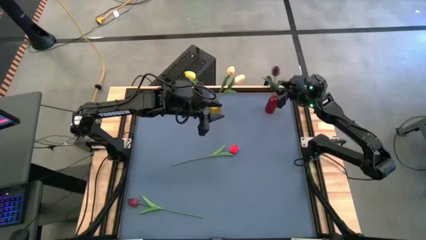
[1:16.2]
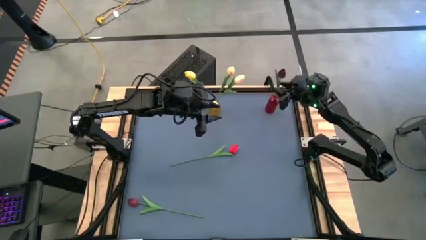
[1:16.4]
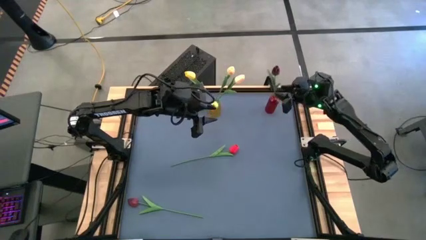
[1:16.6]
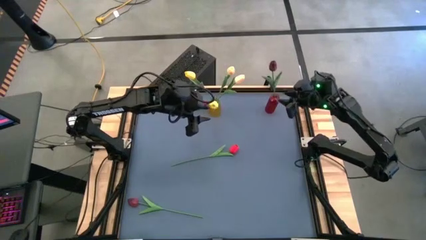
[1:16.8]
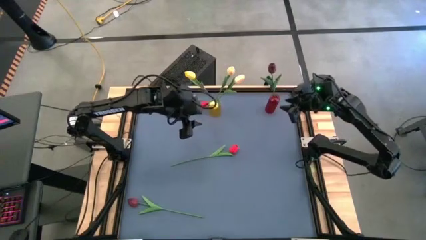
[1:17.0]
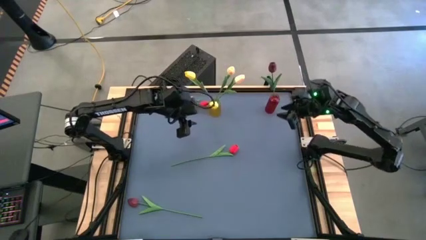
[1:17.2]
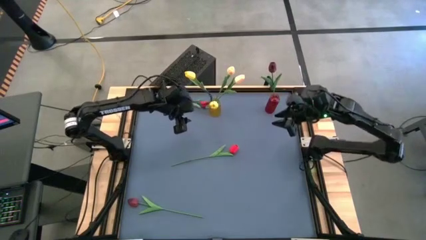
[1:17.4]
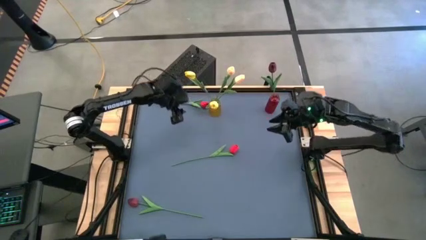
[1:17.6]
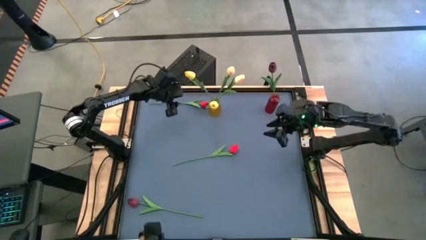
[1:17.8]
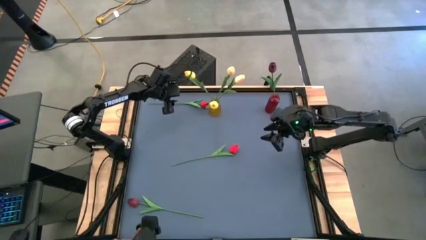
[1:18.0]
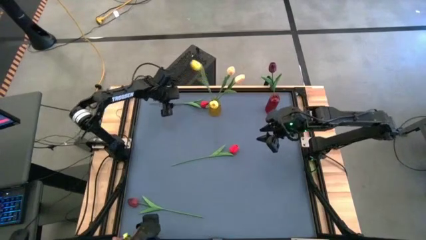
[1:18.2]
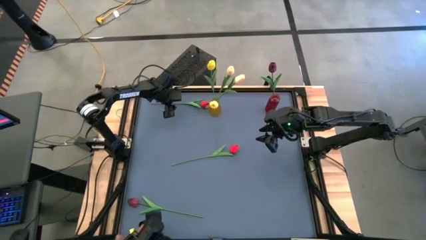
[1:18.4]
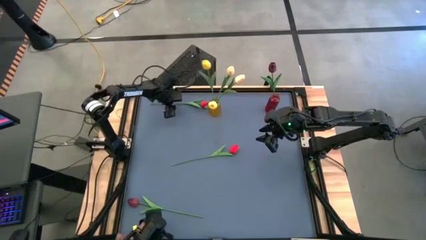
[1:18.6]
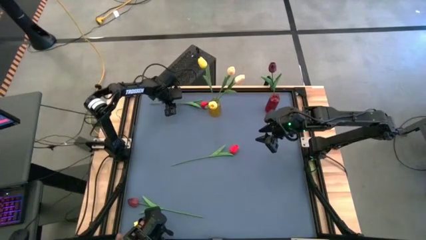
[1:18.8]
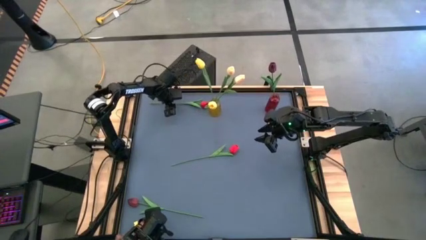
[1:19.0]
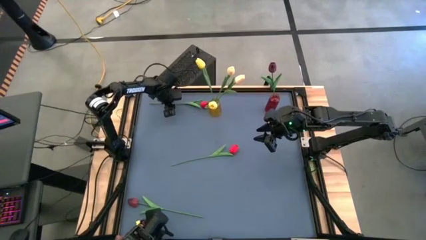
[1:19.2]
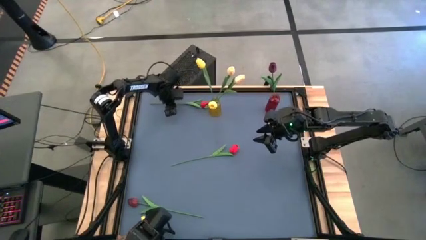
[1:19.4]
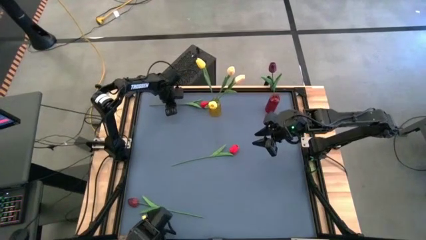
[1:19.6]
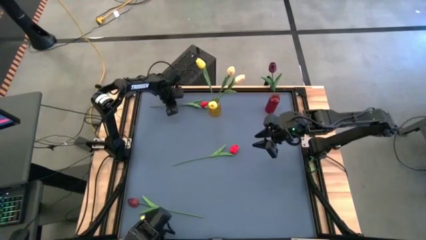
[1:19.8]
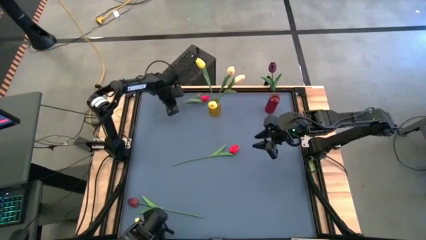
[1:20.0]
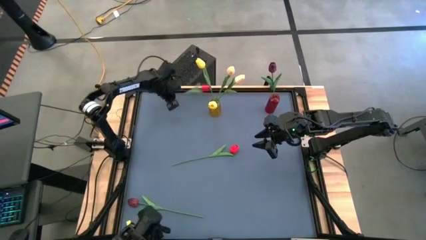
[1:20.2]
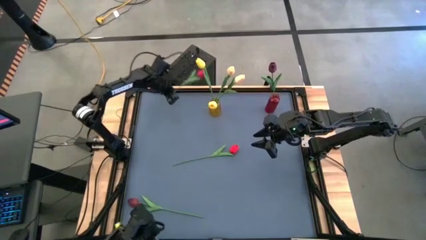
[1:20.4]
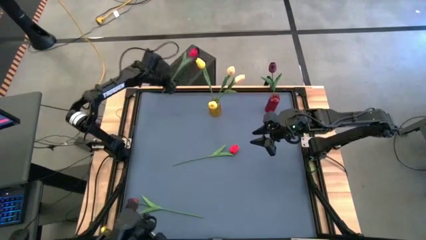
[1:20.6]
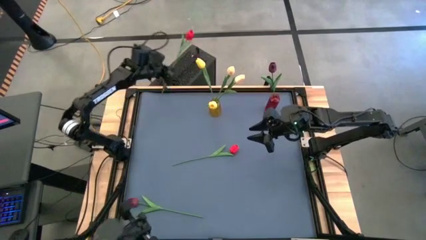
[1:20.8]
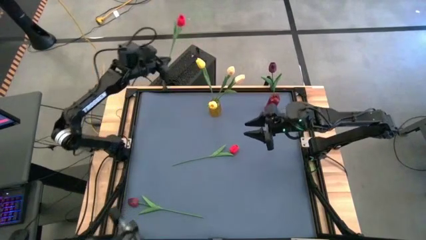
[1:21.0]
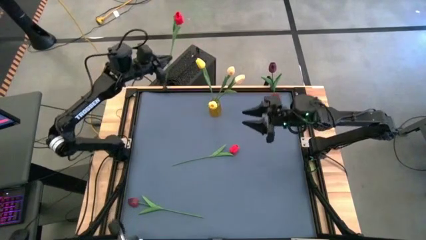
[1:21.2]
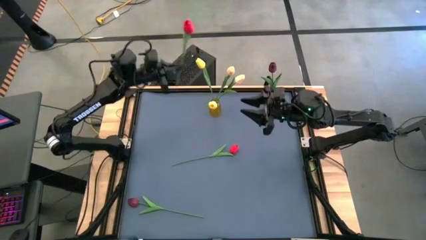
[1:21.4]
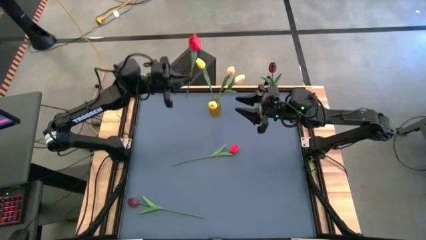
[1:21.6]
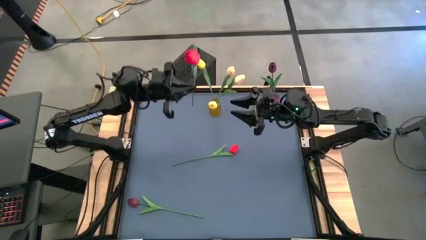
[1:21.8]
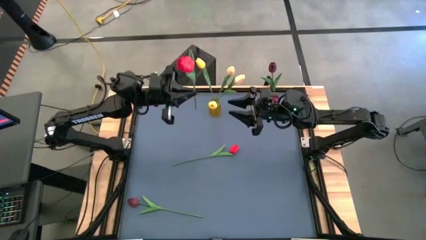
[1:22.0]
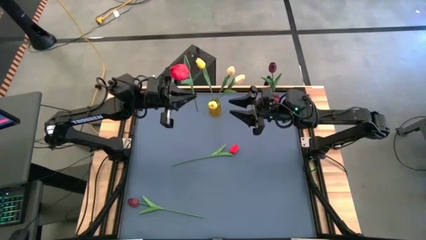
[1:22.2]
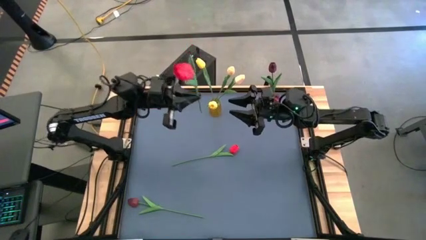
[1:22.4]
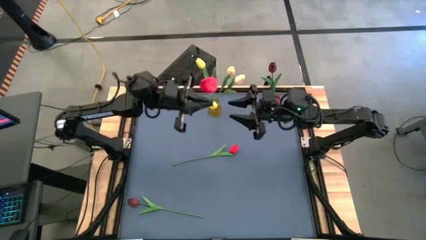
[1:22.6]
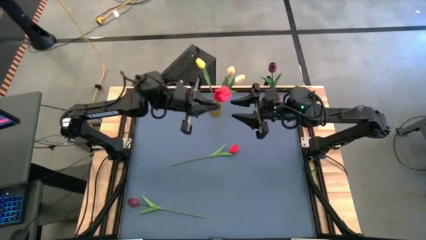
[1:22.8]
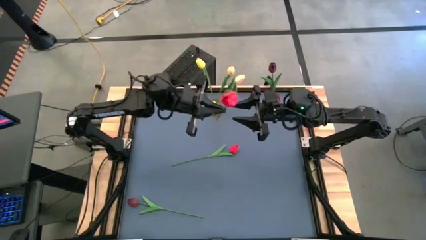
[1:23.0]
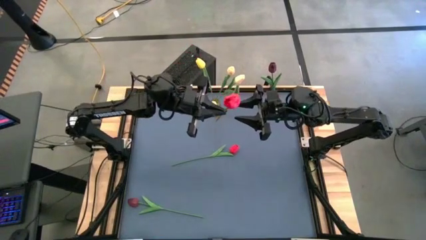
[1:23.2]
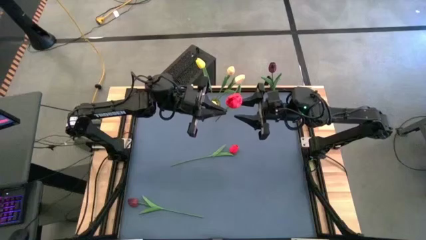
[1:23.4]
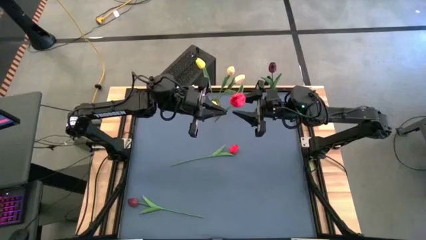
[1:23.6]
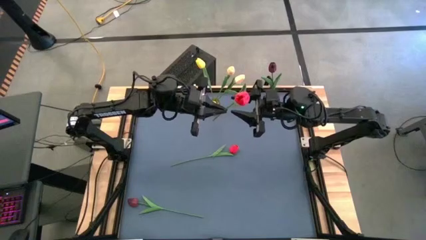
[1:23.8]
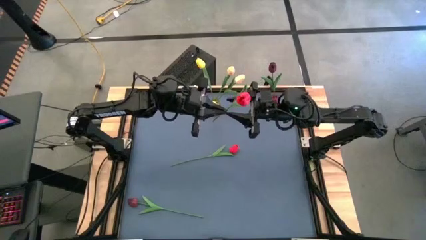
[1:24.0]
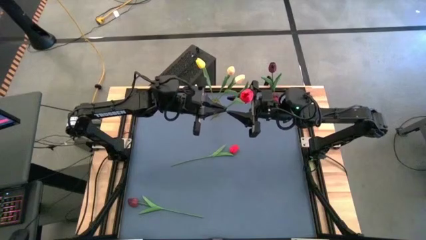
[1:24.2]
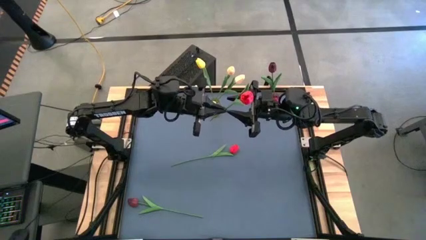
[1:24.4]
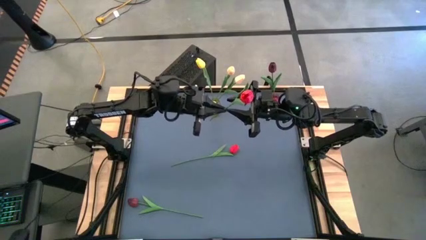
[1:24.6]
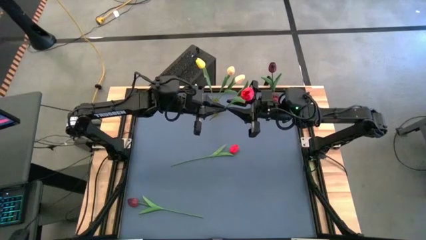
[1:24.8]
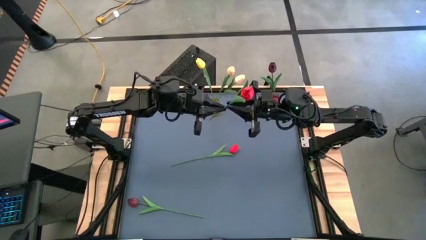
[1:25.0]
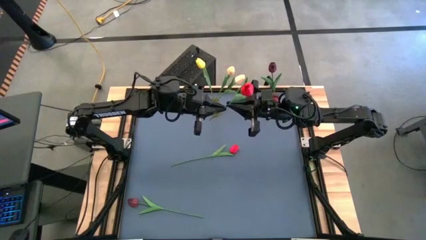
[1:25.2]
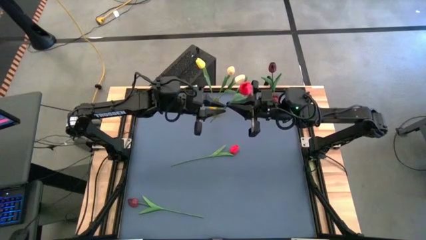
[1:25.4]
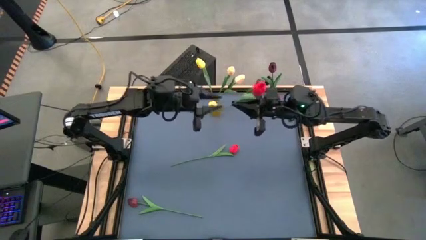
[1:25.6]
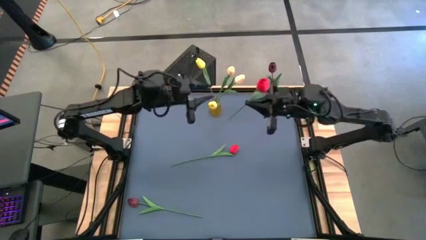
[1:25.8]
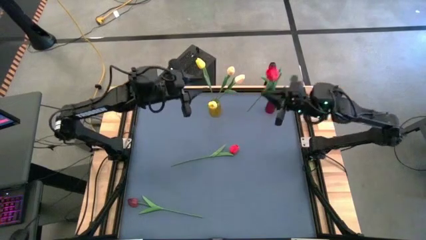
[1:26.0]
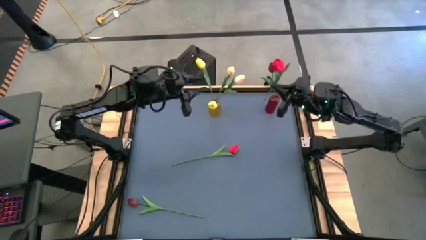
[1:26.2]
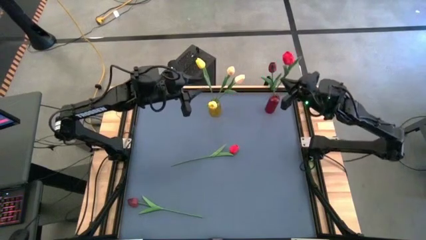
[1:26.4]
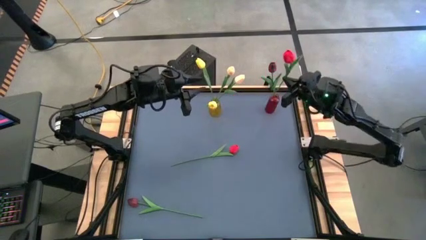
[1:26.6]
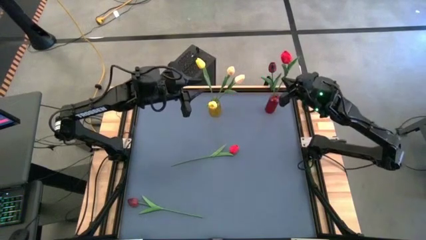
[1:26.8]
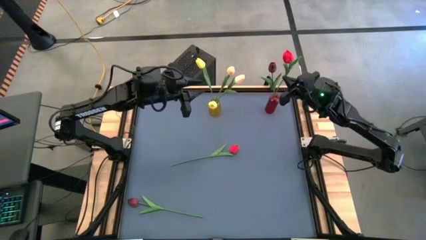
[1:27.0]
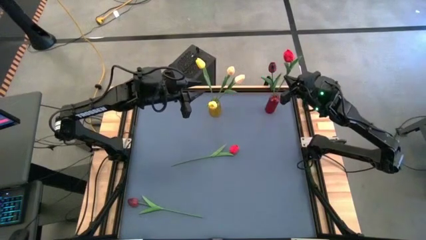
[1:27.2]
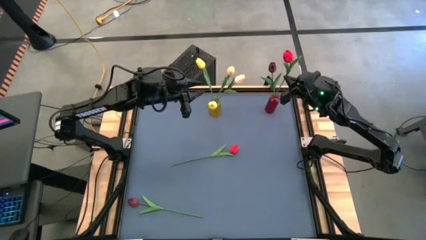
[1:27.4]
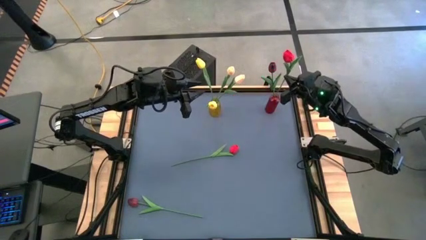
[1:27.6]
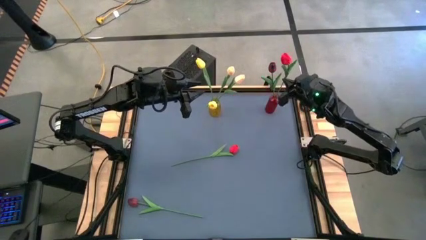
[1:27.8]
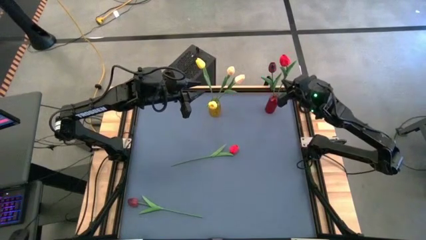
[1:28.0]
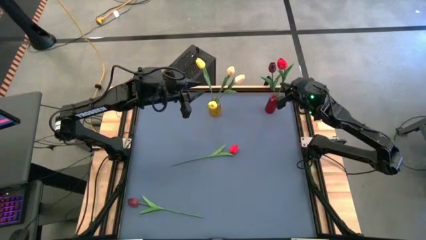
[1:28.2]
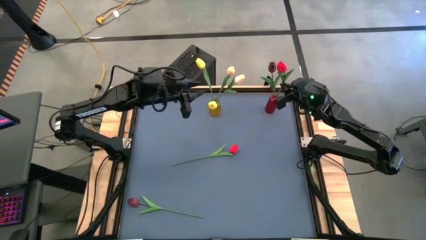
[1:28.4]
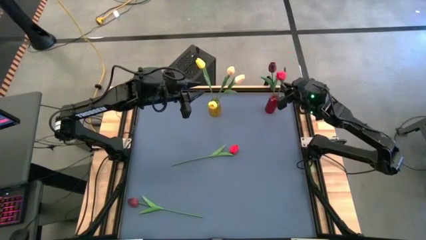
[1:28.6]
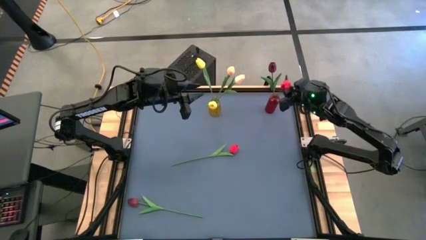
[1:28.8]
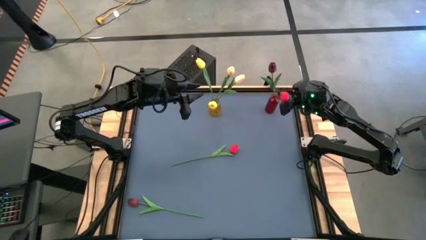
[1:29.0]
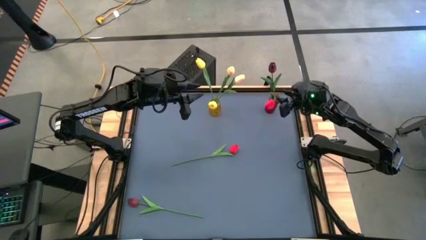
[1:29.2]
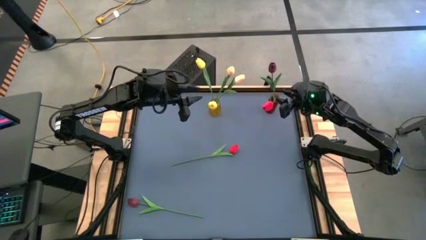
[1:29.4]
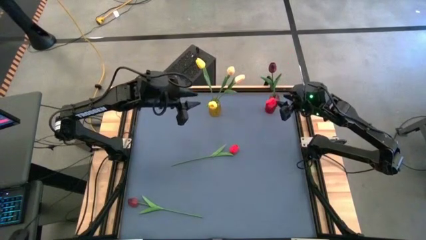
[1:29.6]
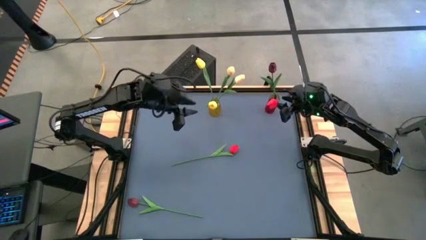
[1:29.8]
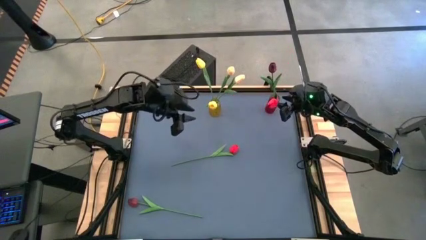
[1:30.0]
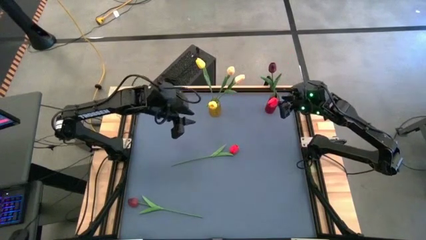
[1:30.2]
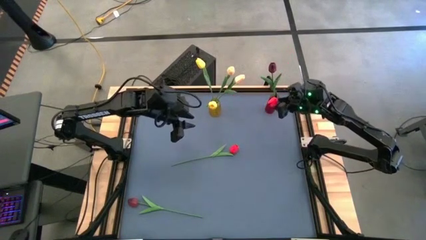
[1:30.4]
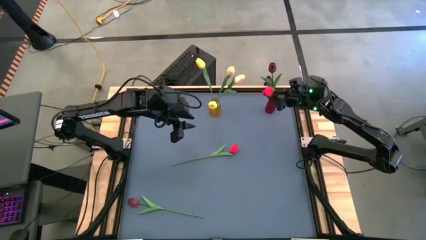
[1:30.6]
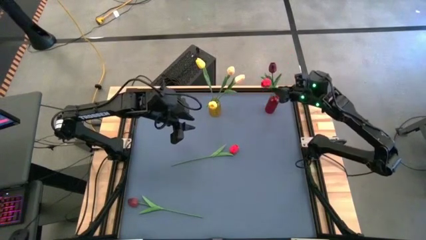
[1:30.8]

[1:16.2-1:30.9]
Task: Sort flowers into vase by color
Put the top red flower into the red vase
